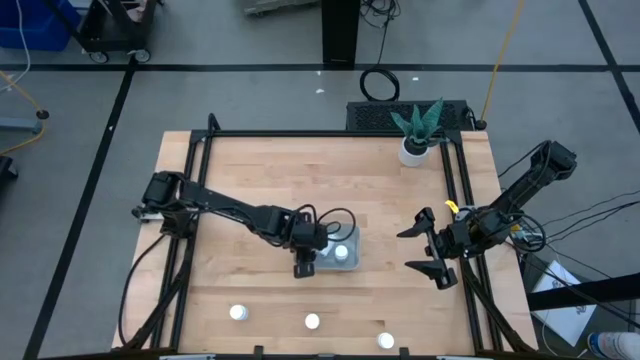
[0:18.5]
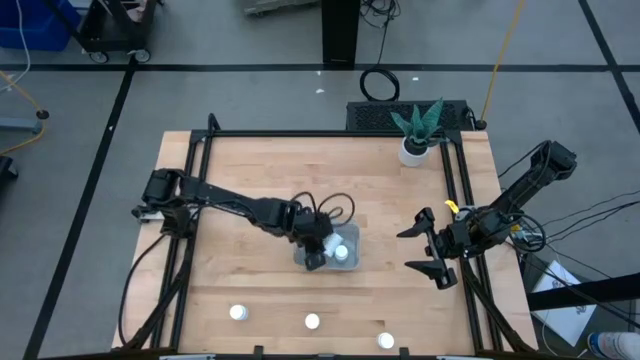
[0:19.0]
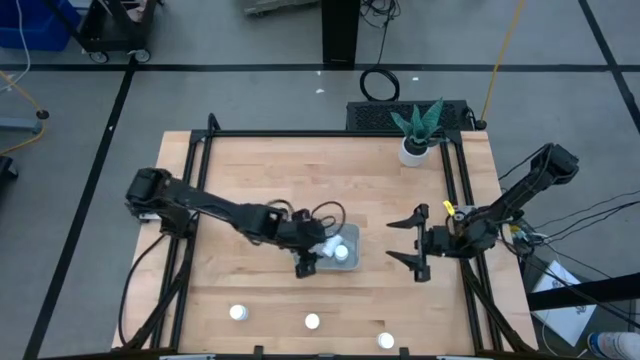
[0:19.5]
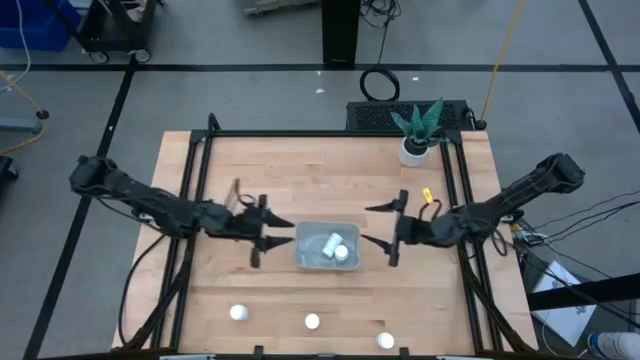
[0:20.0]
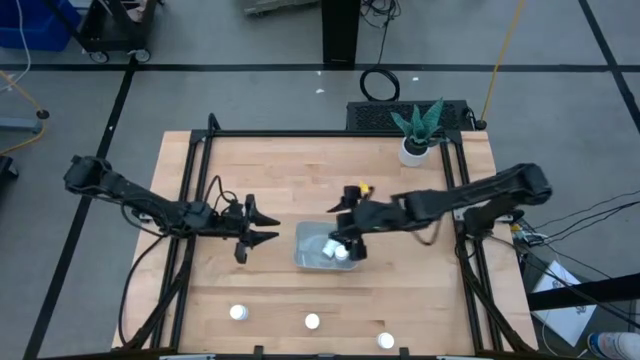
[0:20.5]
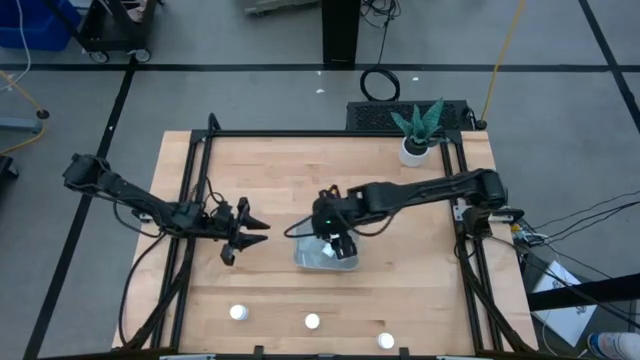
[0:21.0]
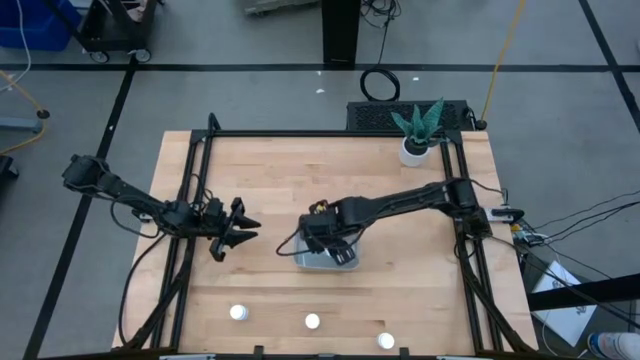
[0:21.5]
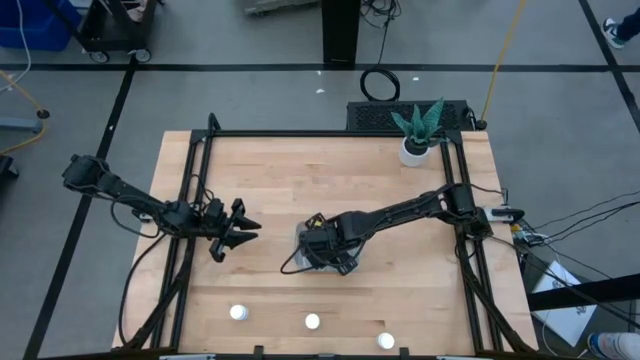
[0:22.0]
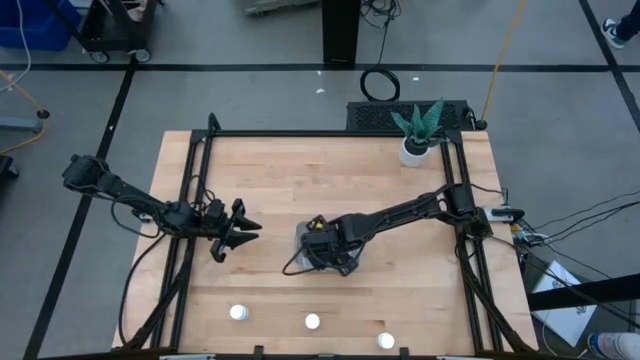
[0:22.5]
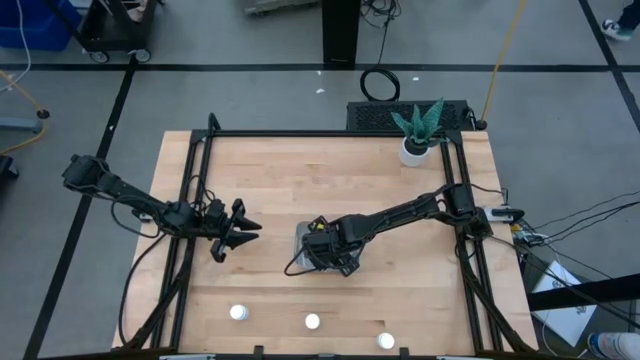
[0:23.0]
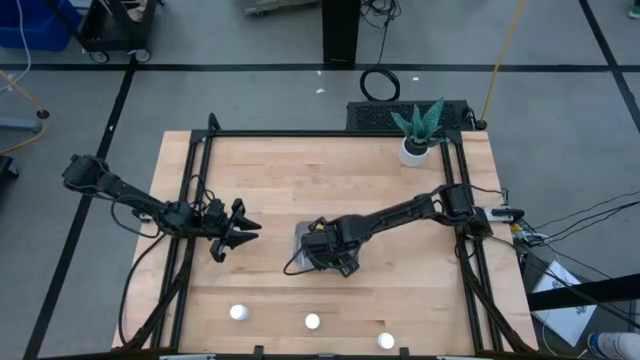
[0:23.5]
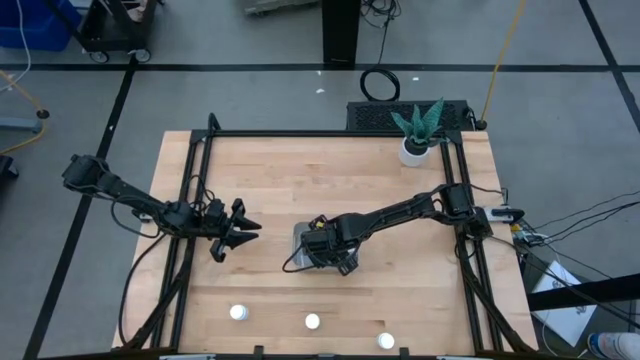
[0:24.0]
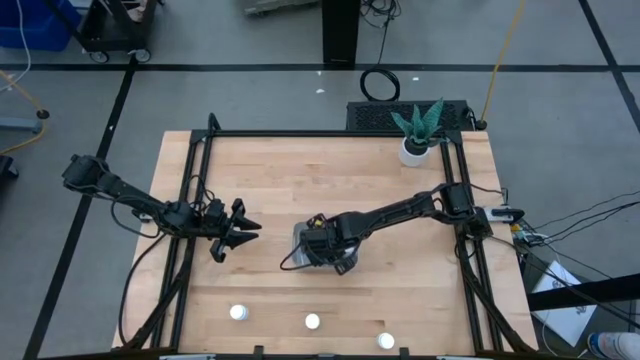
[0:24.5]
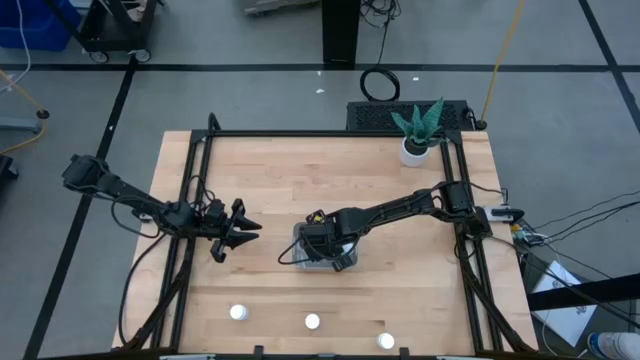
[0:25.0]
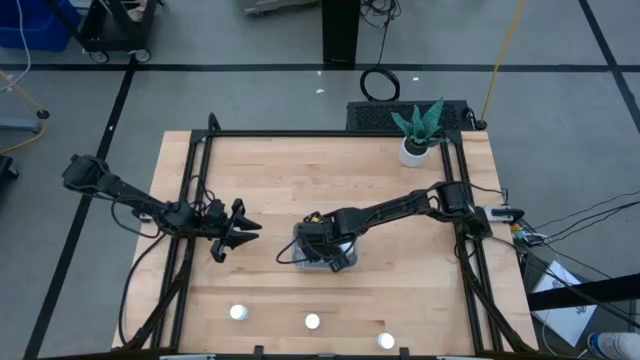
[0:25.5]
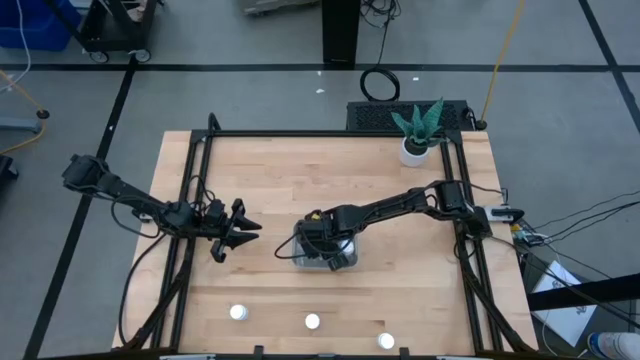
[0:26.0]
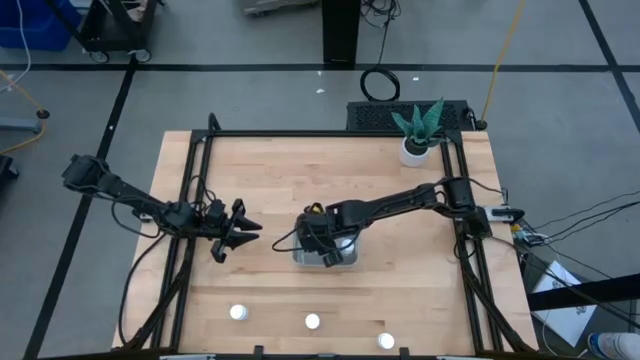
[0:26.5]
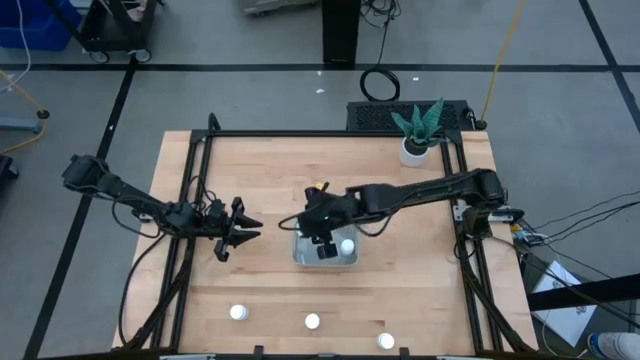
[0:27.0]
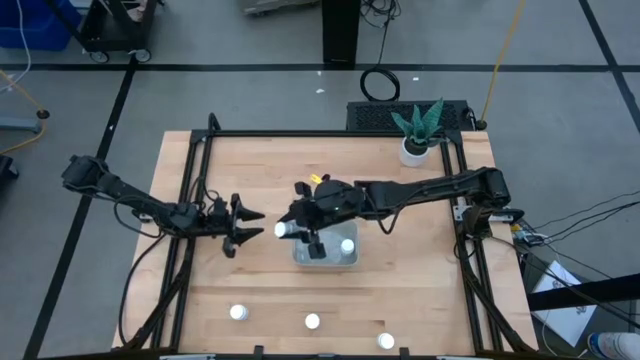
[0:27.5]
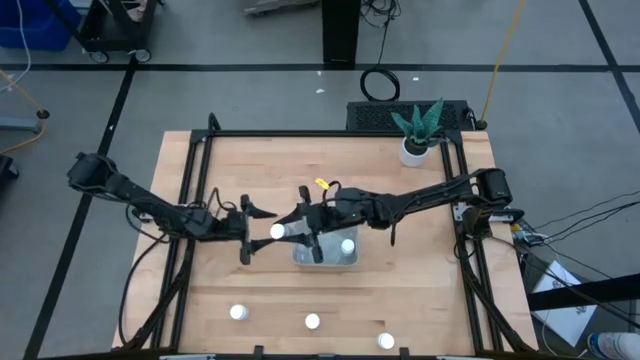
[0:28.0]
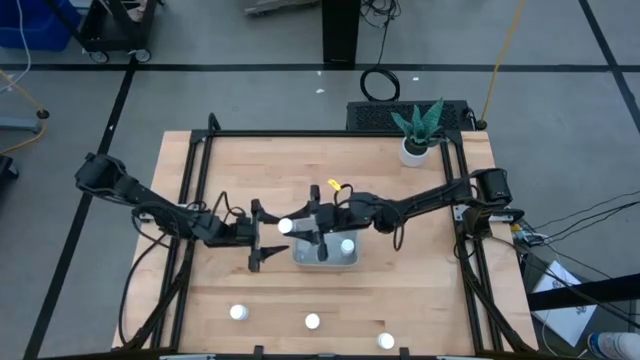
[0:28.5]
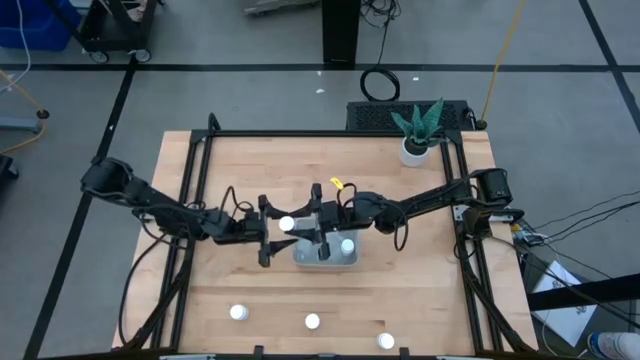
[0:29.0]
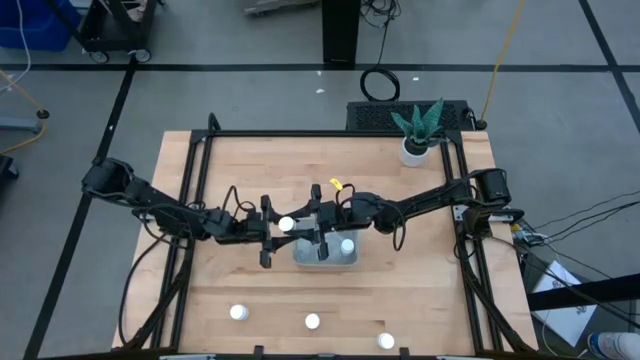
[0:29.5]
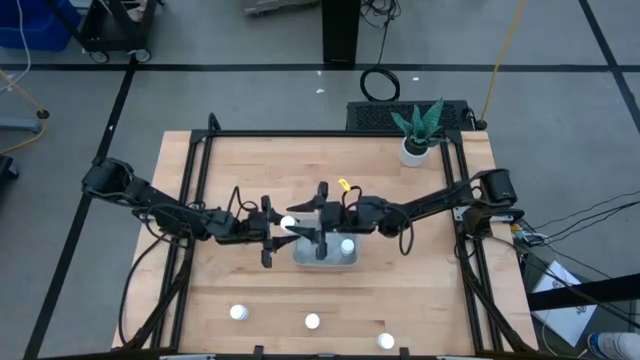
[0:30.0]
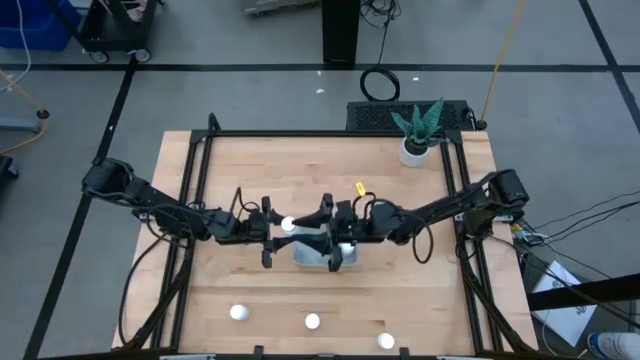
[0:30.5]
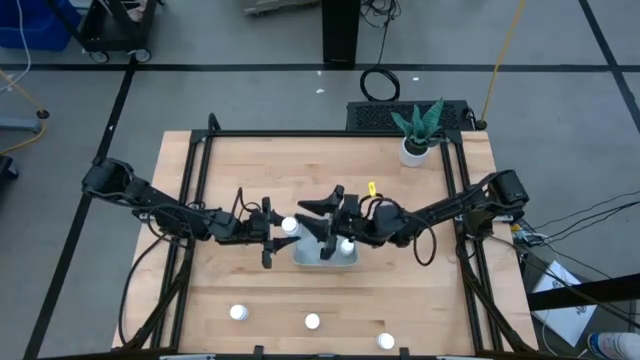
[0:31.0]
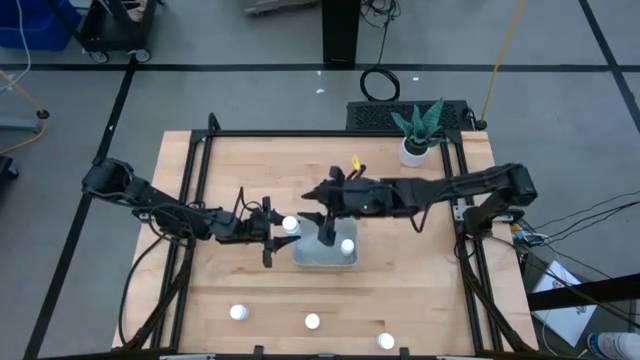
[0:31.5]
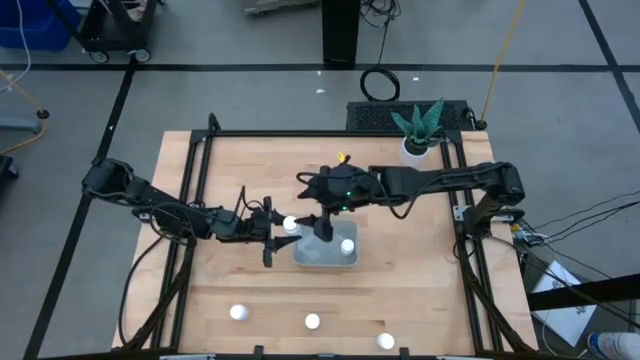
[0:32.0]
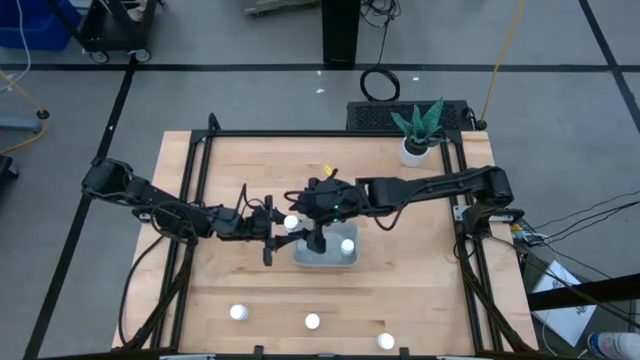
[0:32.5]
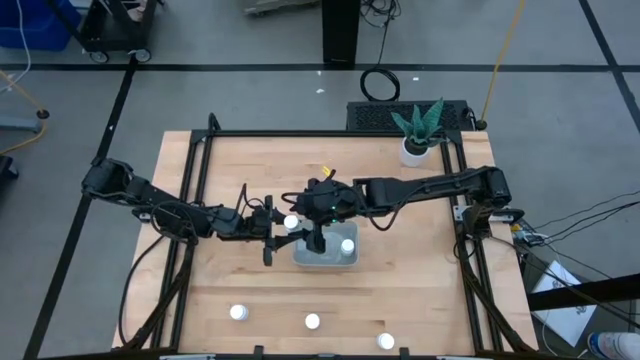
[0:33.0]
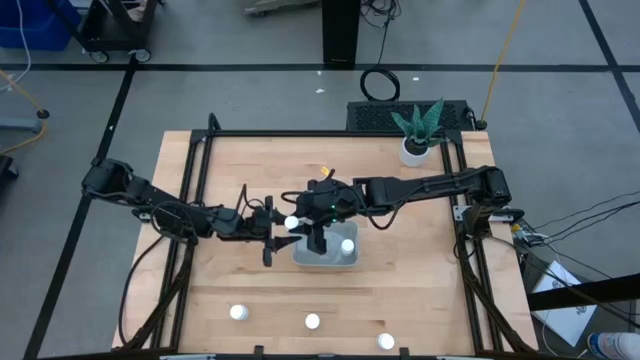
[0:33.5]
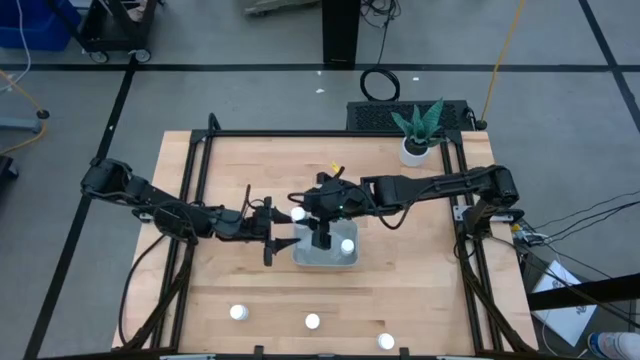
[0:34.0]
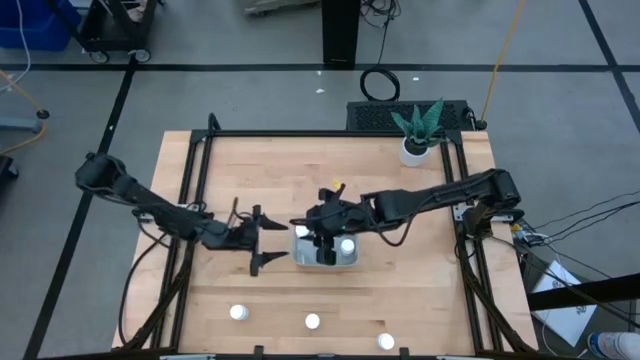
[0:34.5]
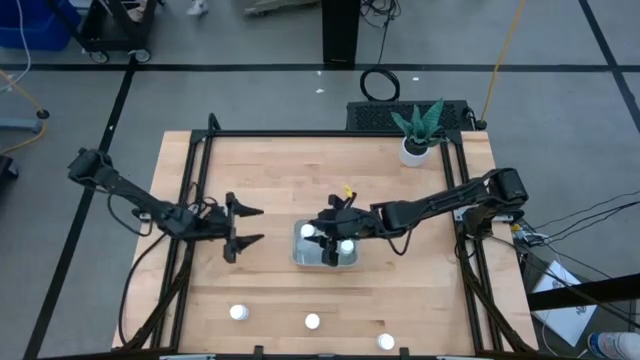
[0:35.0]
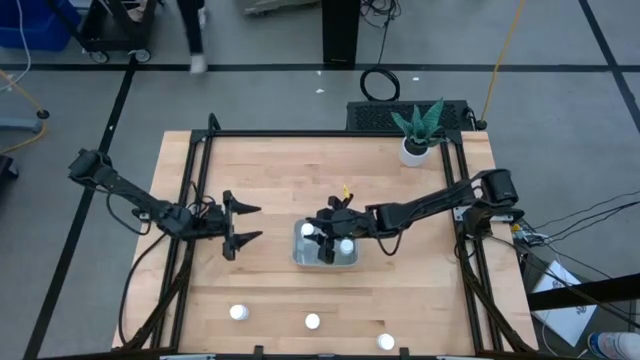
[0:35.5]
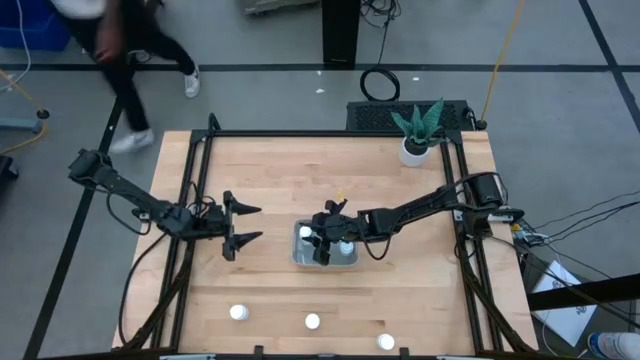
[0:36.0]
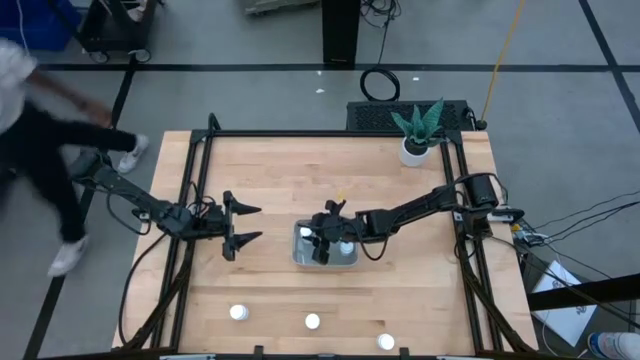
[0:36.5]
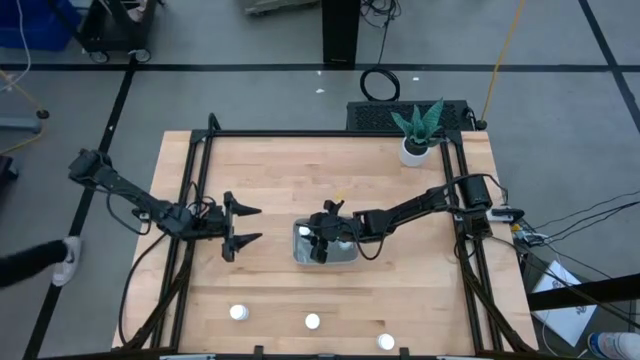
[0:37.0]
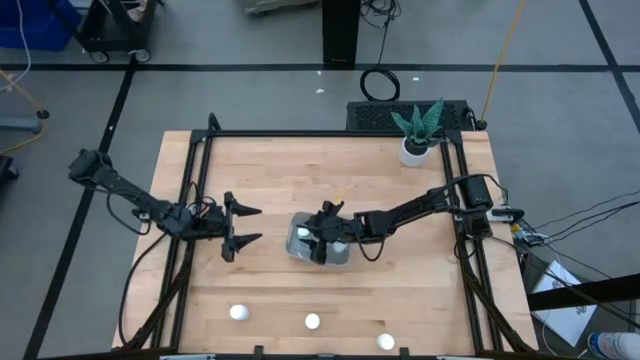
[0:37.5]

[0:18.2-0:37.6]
Task: Pick and place pill bottles into a basket
Put the pill bottle into the bin

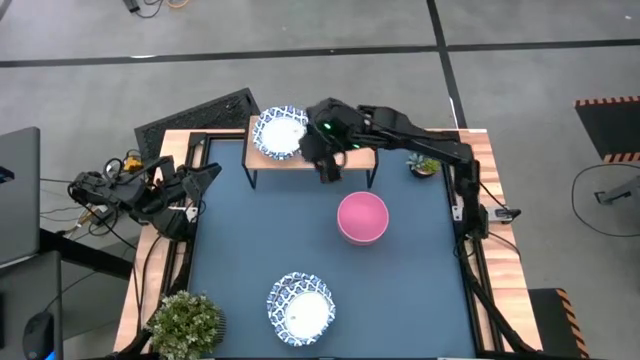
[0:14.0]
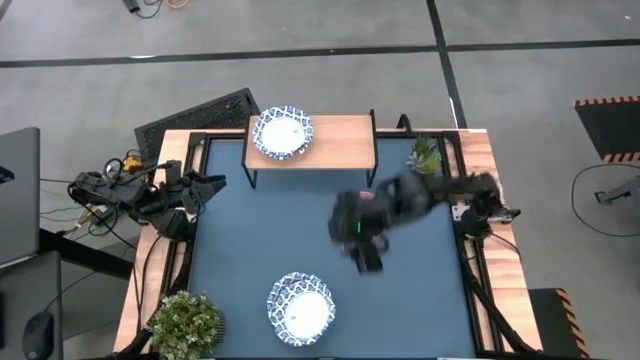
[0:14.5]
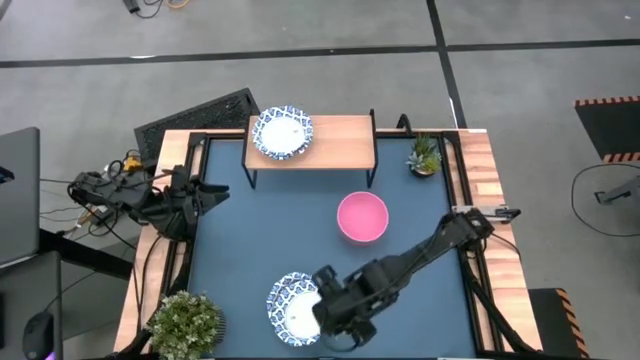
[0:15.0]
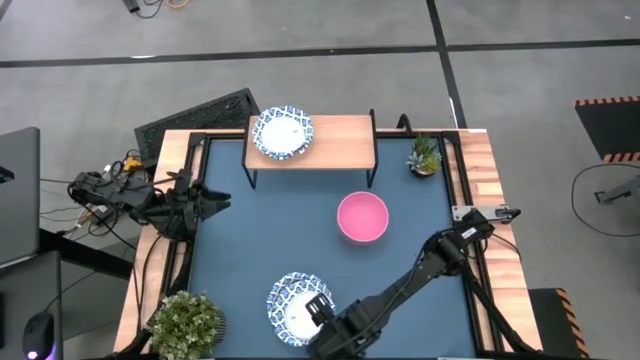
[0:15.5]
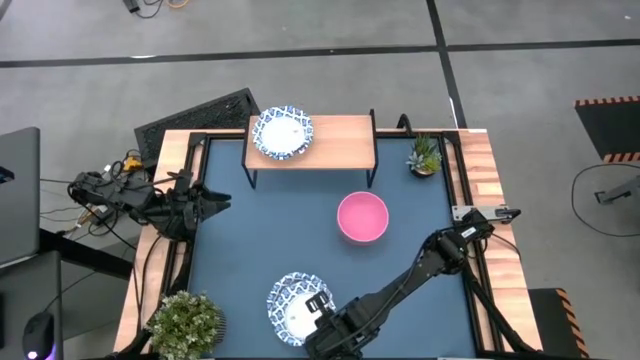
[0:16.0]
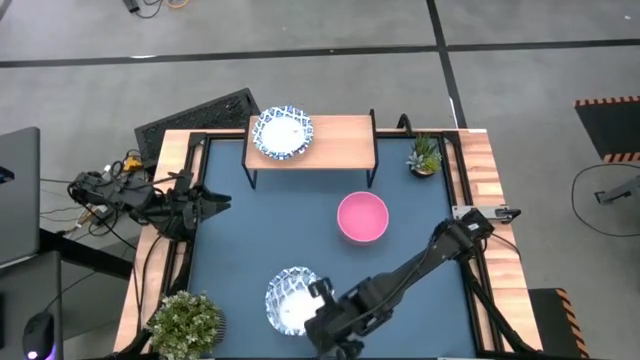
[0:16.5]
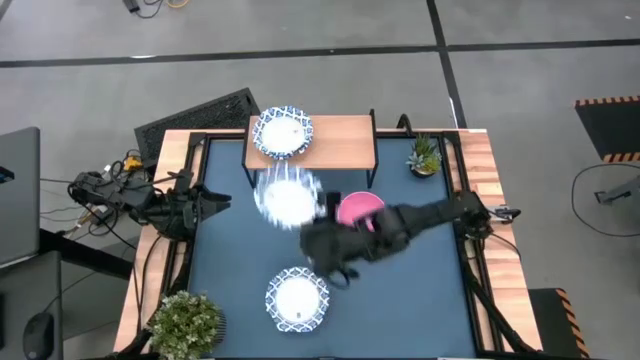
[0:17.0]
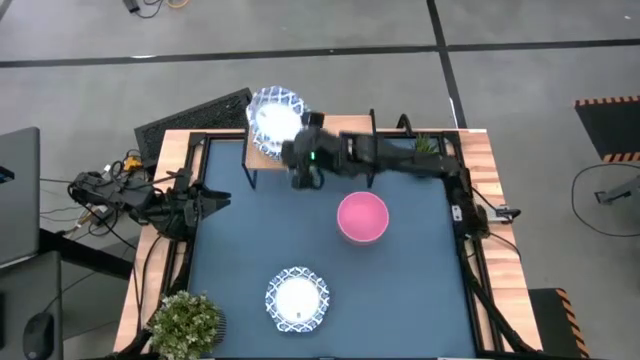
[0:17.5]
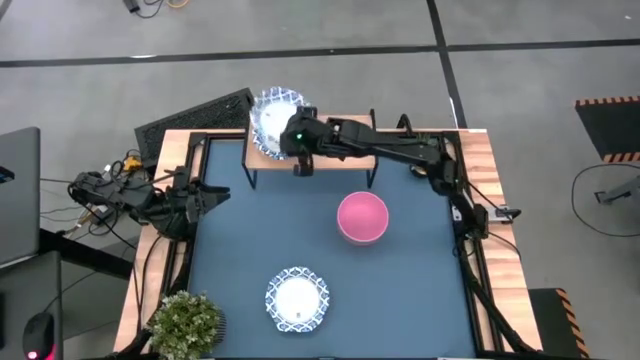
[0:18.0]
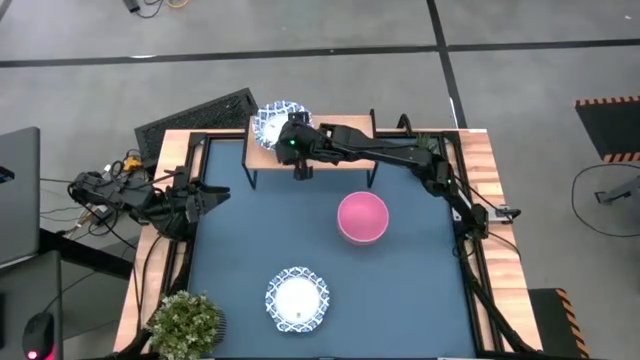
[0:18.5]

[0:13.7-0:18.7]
Task: Place and stack bowls onto a shelf
Stack the white bowl on top of the white bowl on the shelf
